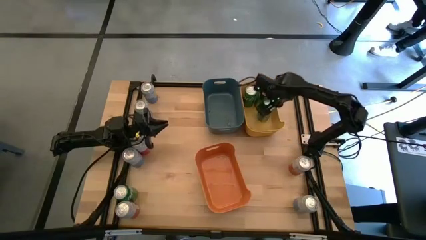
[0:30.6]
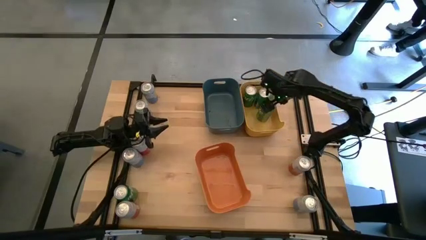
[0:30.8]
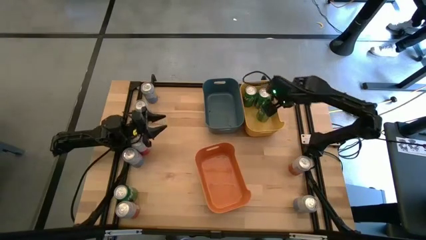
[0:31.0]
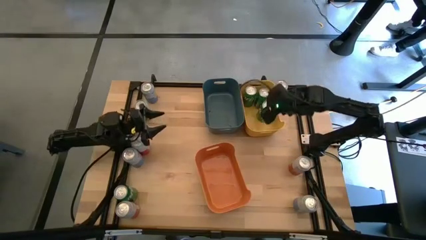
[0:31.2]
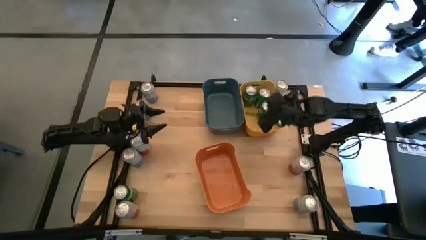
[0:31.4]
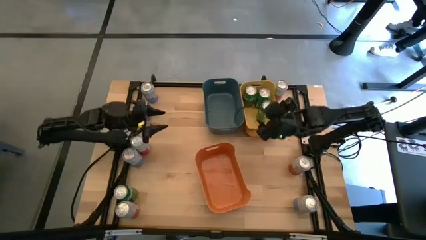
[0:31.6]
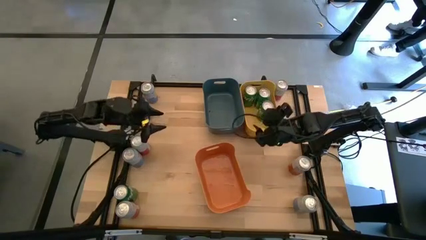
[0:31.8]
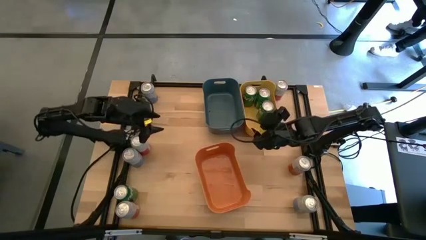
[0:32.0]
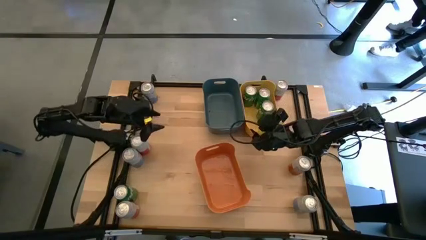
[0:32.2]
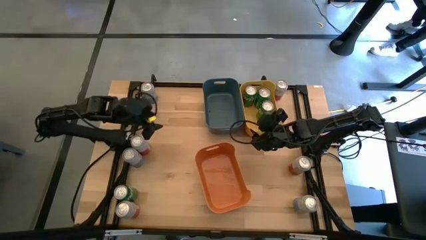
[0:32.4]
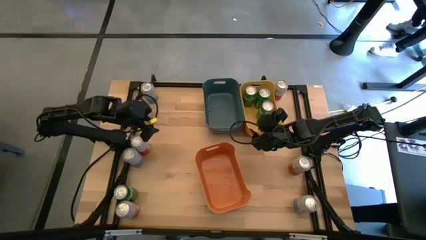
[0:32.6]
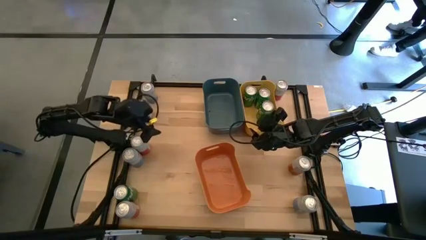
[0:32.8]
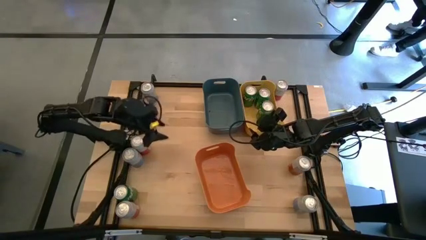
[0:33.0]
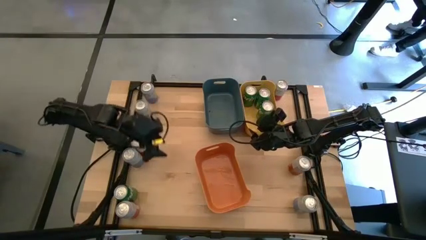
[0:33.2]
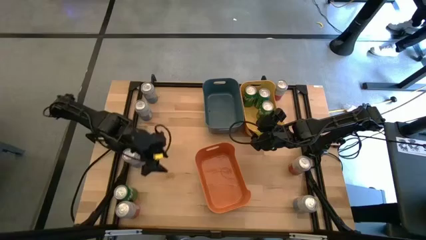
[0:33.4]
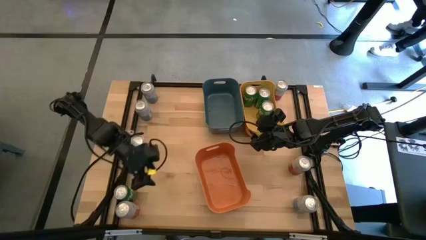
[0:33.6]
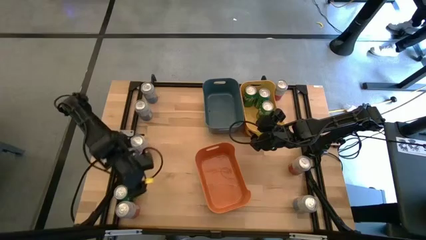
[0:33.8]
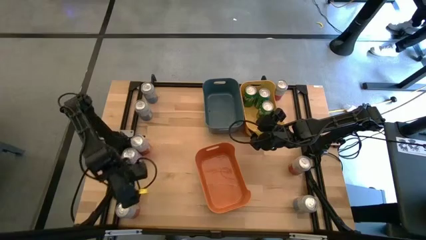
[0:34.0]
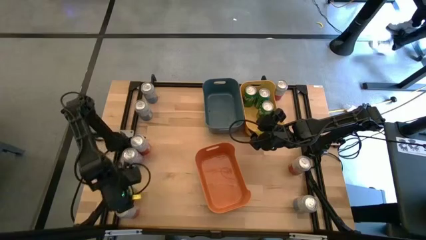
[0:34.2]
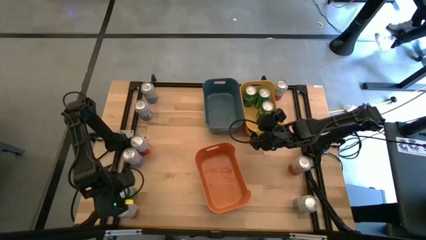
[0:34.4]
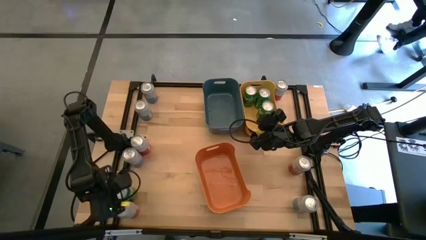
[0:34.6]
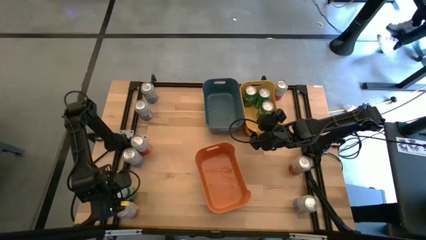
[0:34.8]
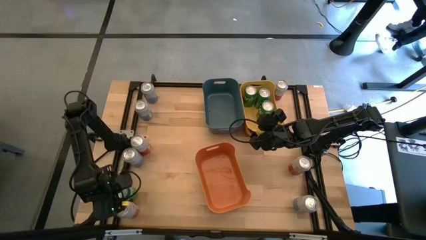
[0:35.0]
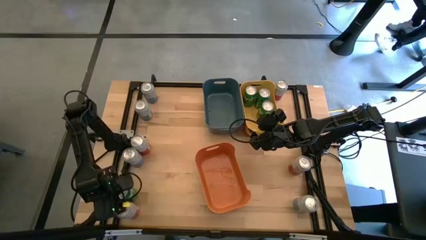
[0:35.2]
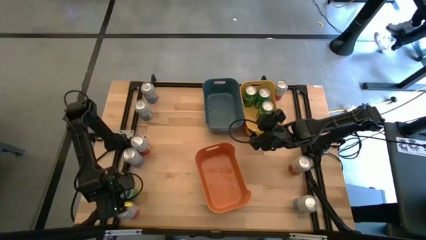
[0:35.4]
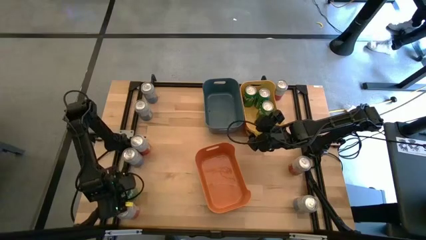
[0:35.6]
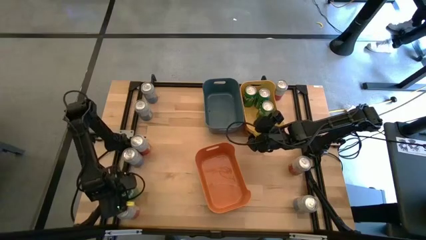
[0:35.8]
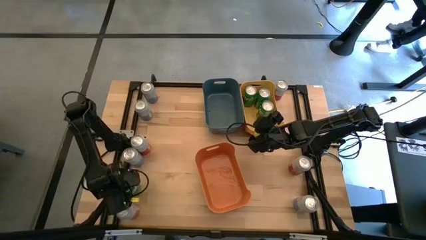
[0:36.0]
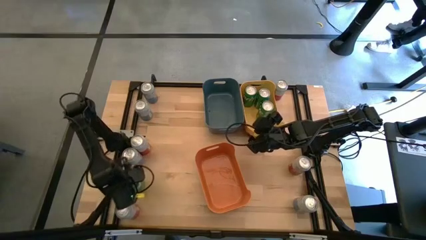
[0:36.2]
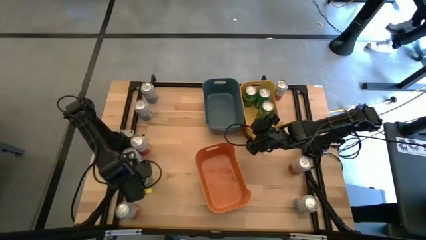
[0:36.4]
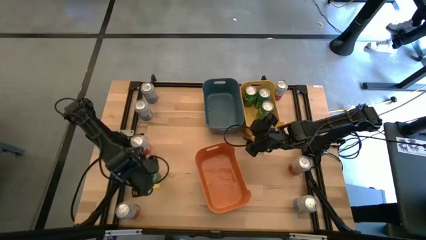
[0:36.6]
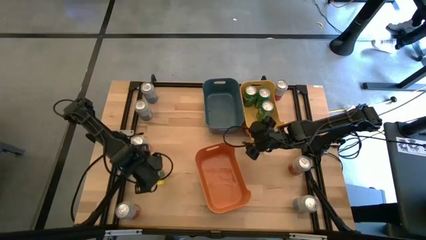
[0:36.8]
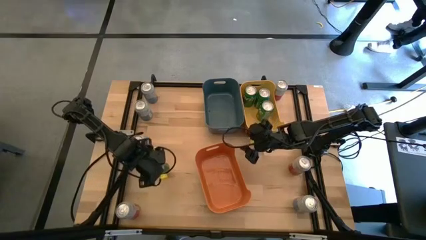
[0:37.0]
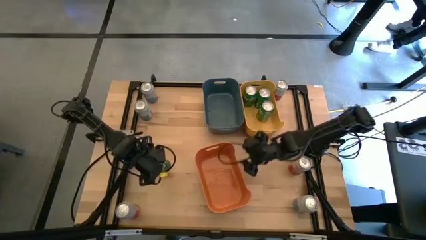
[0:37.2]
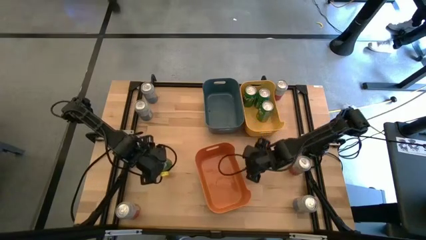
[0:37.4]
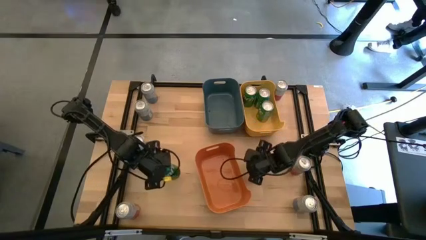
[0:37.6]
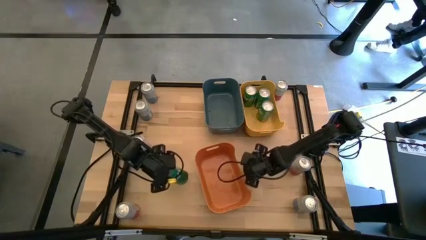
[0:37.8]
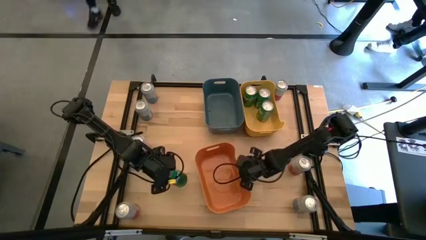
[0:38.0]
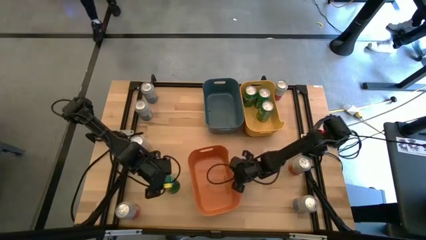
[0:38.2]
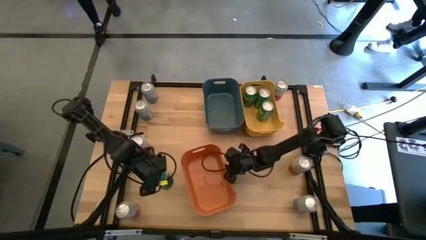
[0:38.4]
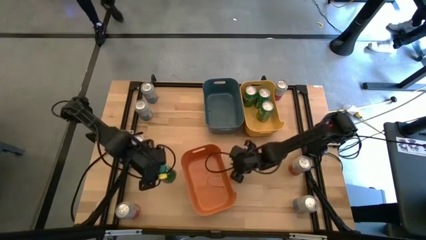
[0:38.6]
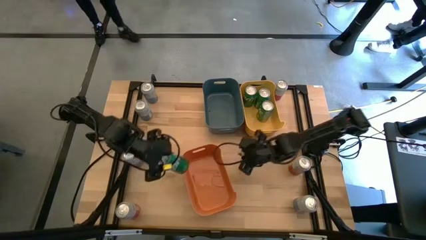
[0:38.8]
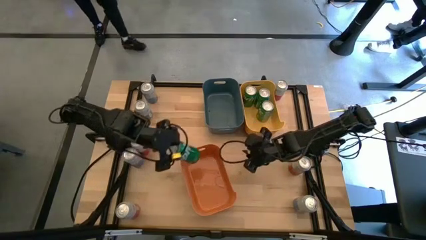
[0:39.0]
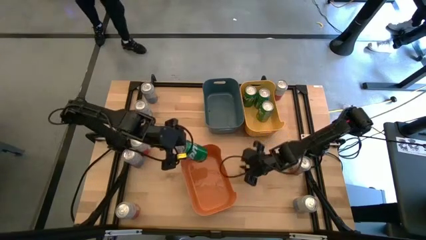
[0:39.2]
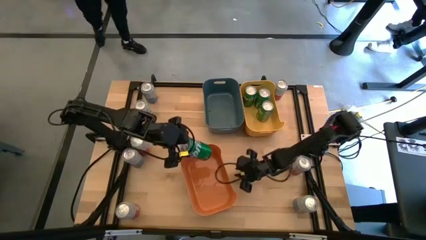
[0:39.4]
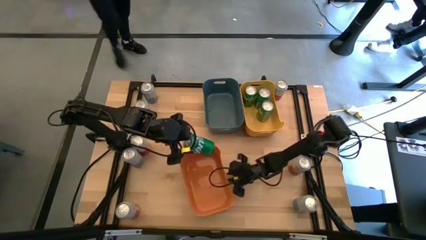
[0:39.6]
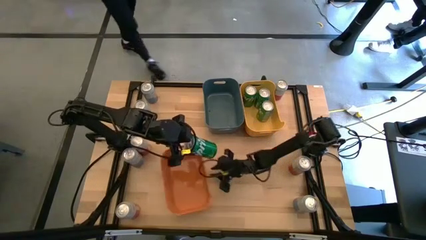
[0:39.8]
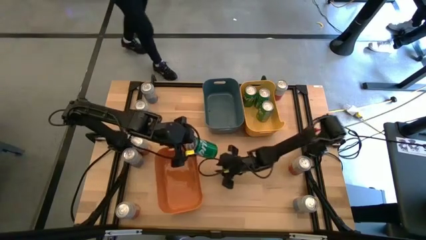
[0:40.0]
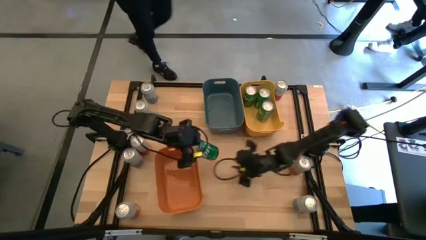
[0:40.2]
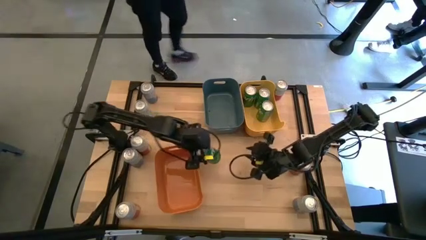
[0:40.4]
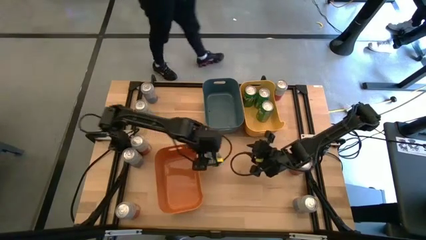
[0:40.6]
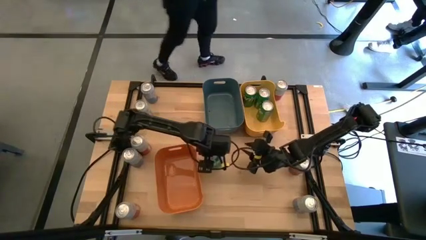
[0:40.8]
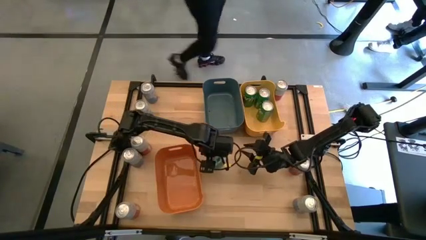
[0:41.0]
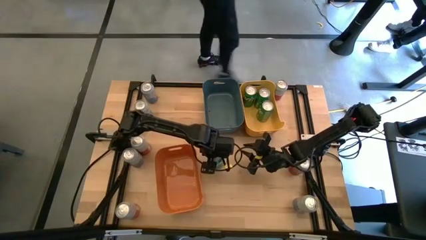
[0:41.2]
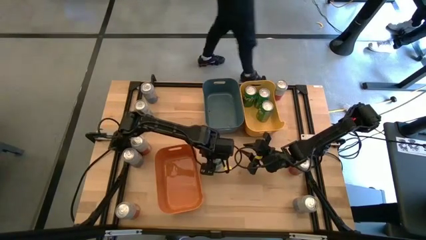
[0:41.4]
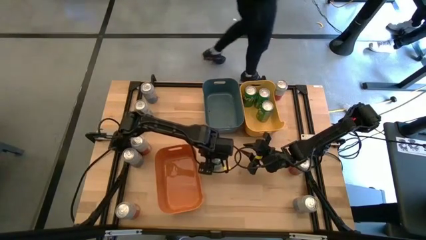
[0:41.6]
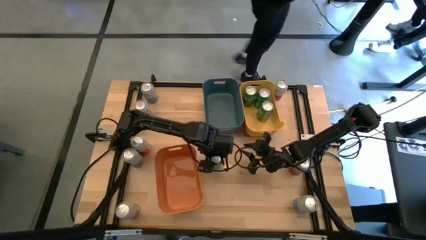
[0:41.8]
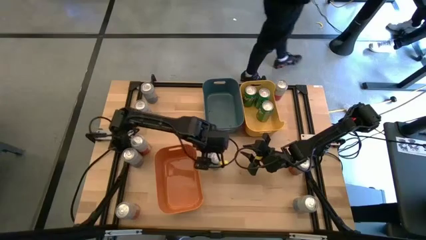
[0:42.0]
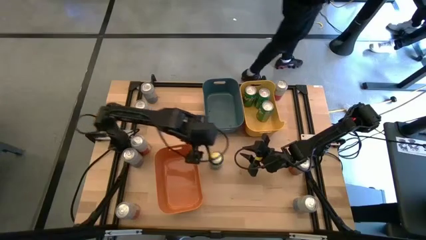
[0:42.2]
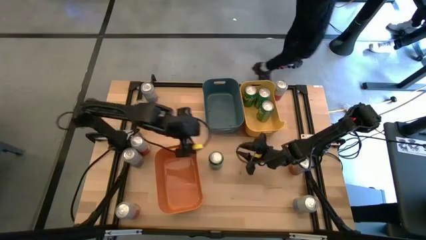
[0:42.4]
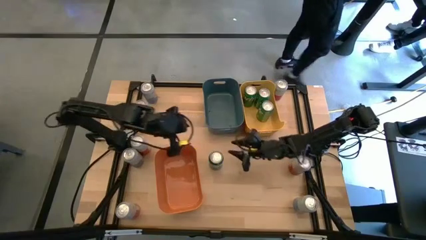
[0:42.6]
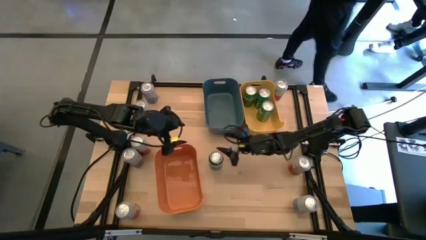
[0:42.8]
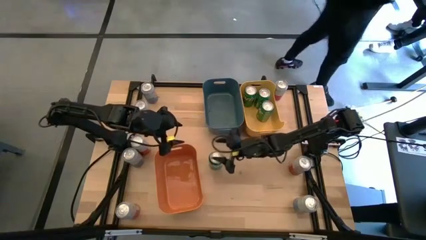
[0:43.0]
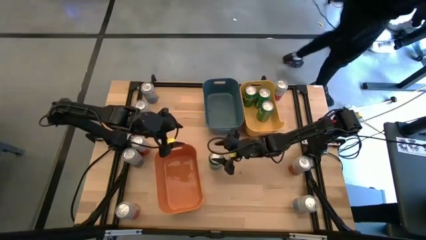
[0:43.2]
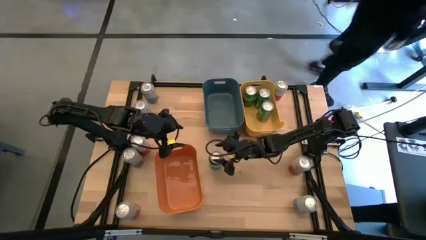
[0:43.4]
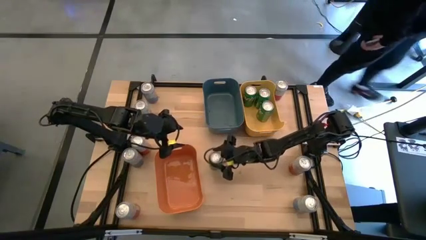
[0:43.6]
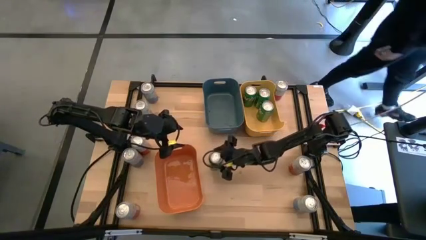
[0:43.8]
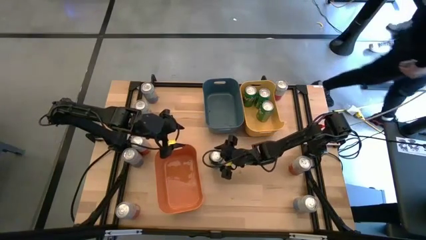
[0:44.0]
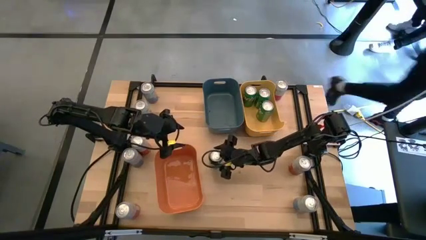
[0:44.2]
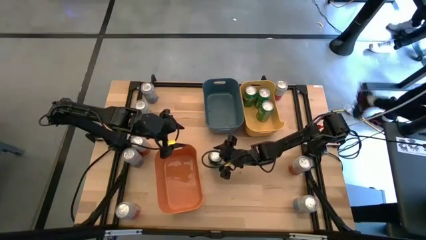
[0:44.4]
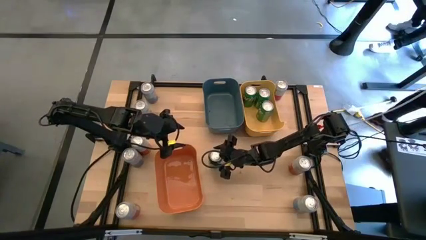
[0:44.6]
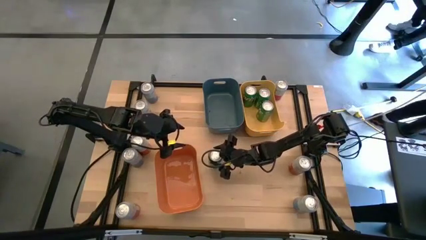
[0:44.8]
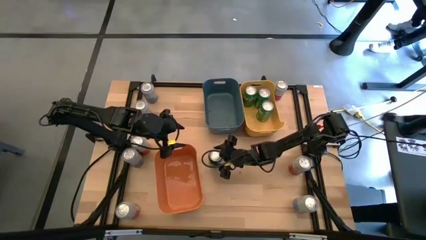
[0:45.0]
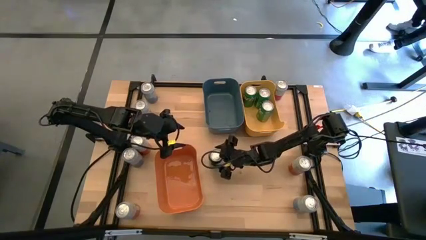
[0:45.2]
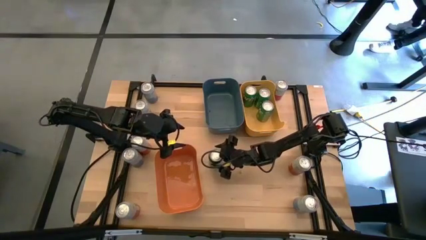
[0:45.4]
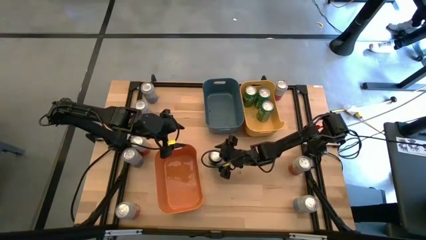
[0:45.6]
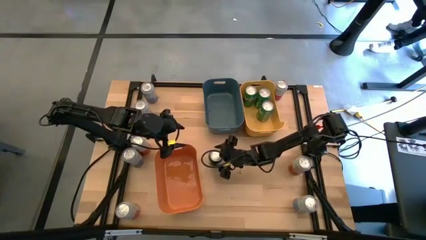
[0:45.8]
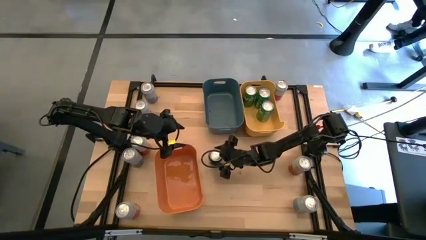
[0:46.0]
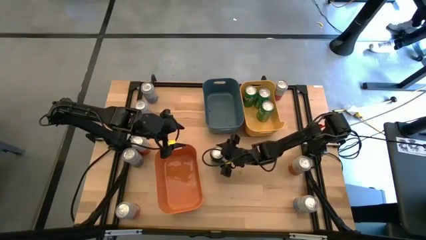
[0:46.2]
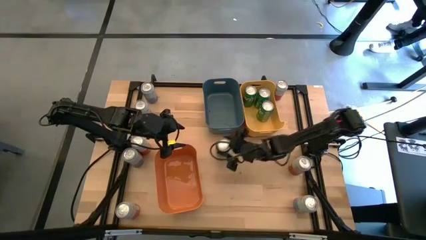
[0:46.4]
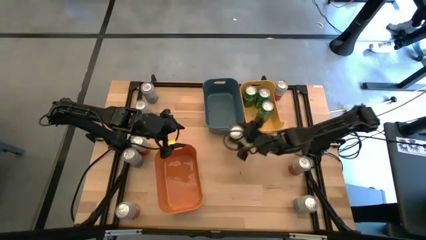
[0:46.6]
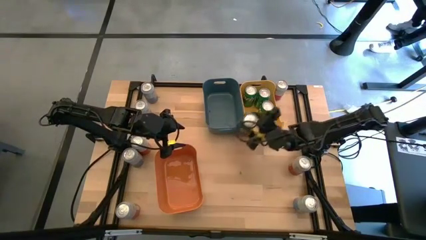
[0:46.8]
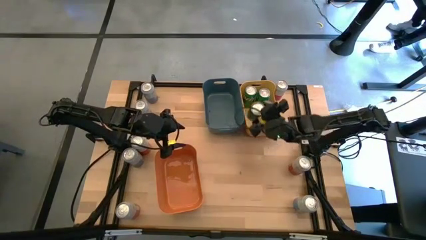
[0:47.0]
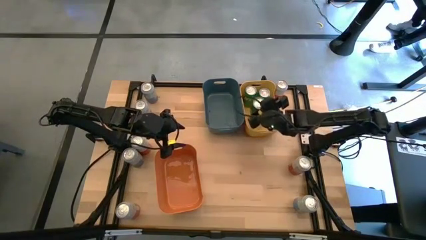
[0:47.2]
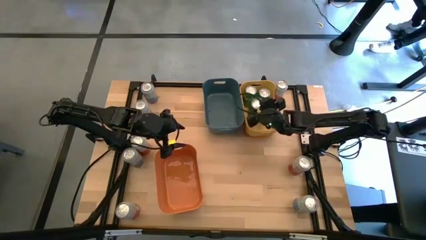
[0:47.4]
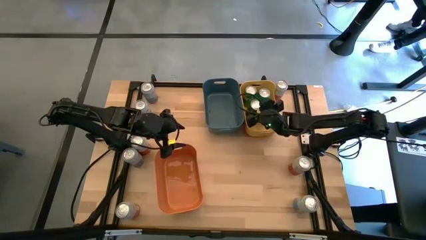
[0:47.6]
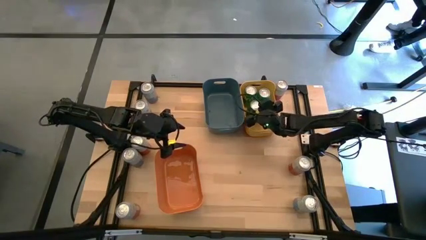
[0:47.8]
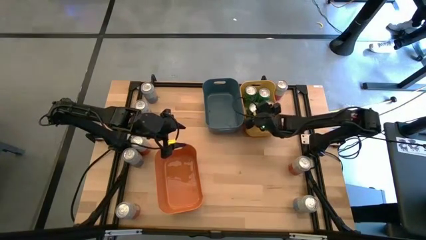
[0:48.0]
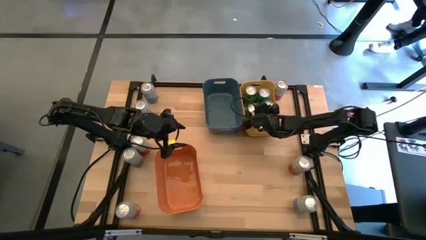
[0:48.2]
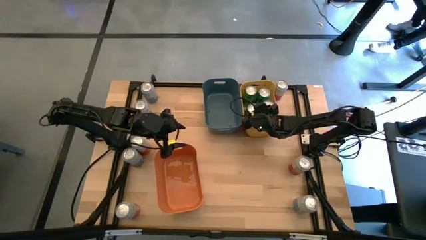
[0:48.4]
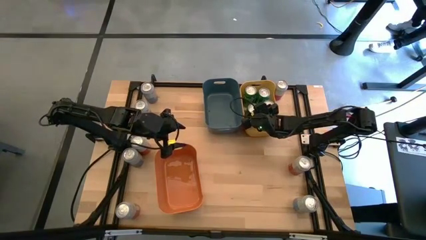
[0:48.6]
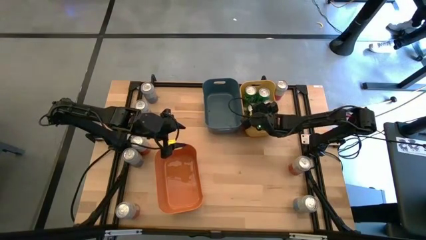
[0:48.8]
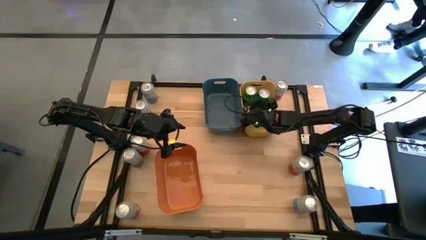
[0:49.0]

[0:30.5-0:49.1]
Task: Sort soda cans
Put the green soda can into the yellow bin
